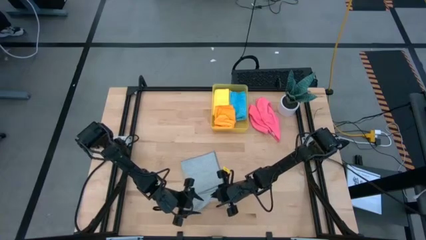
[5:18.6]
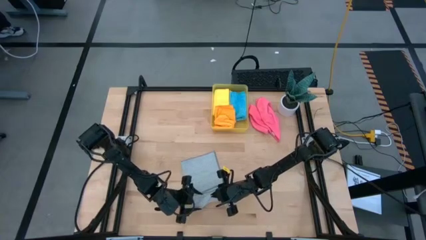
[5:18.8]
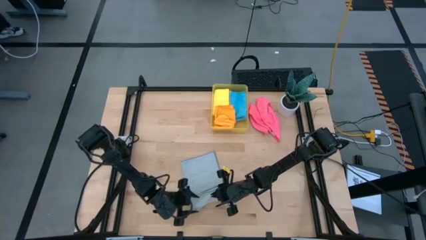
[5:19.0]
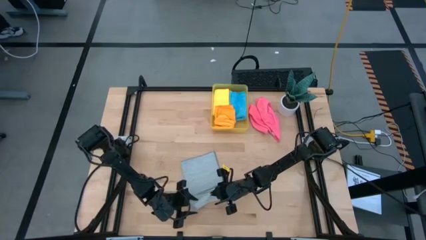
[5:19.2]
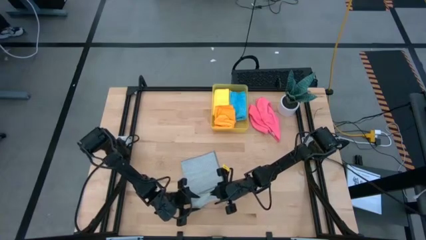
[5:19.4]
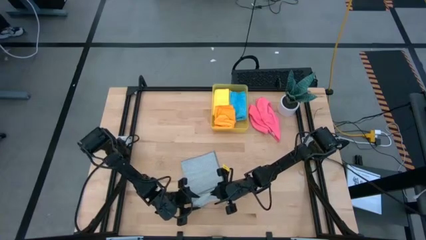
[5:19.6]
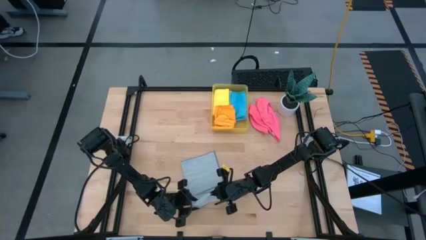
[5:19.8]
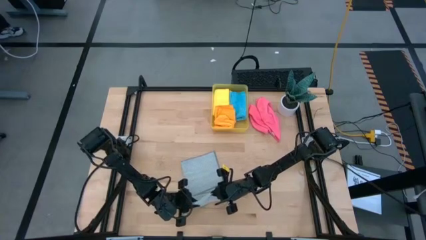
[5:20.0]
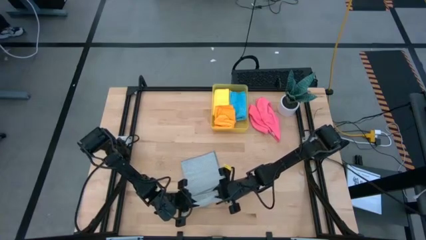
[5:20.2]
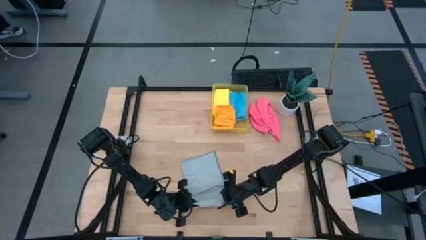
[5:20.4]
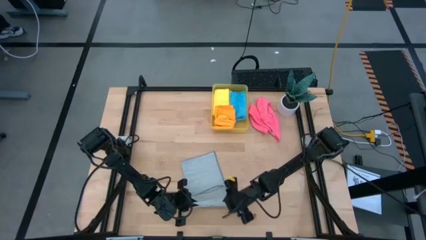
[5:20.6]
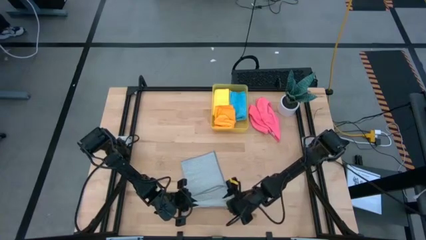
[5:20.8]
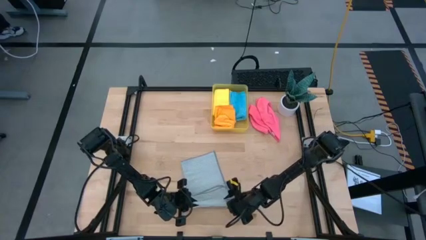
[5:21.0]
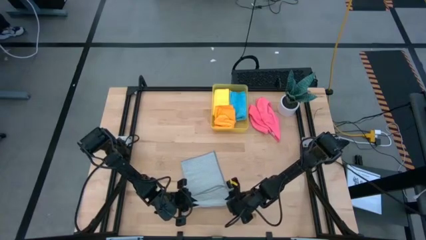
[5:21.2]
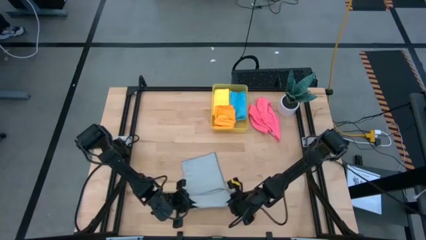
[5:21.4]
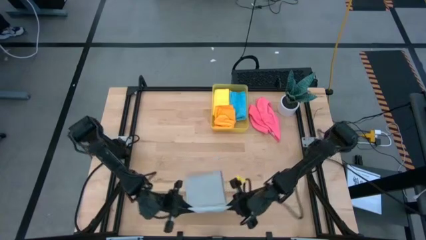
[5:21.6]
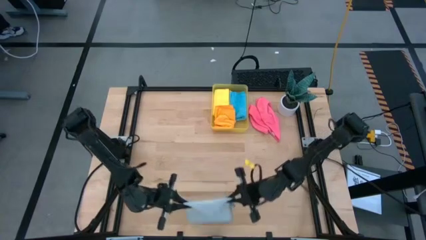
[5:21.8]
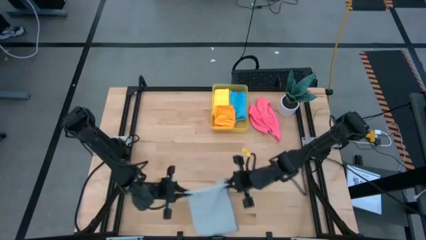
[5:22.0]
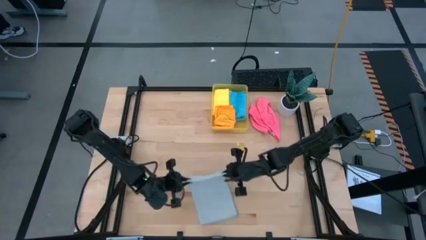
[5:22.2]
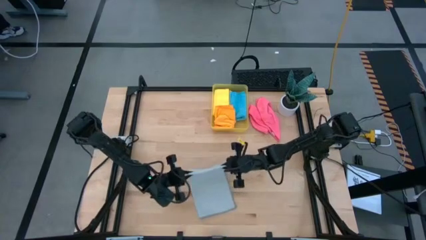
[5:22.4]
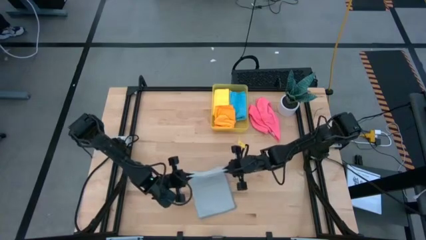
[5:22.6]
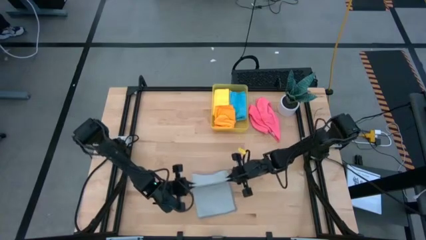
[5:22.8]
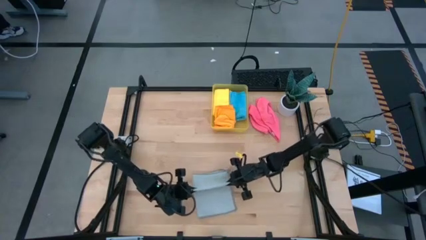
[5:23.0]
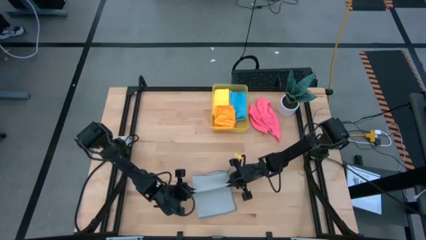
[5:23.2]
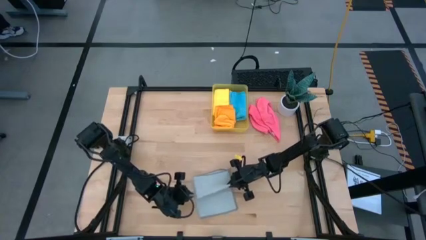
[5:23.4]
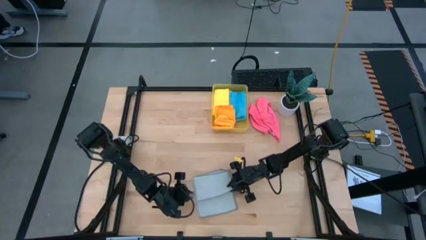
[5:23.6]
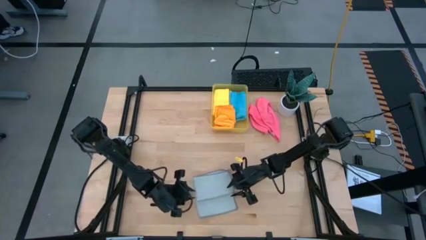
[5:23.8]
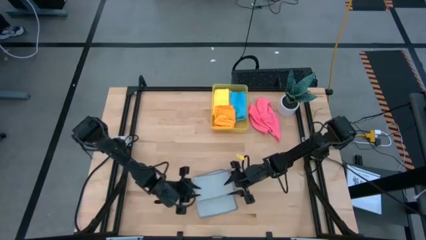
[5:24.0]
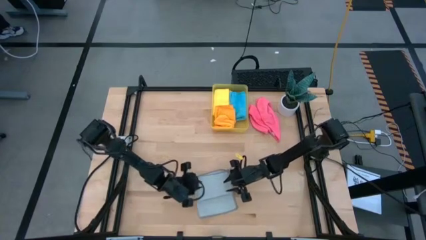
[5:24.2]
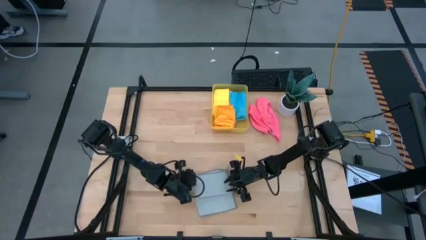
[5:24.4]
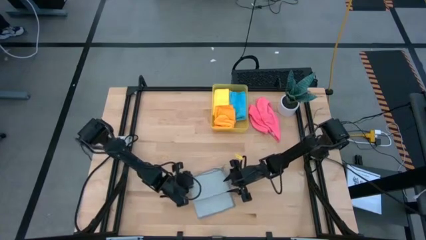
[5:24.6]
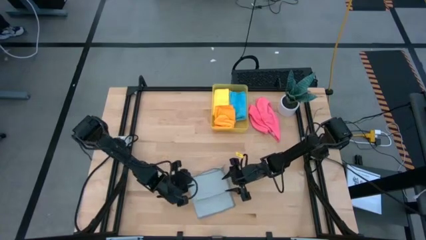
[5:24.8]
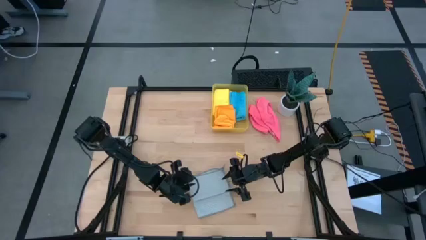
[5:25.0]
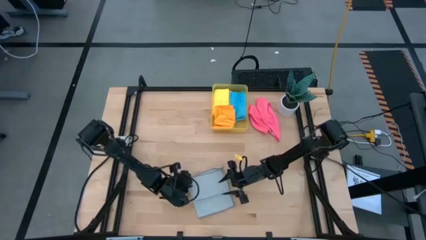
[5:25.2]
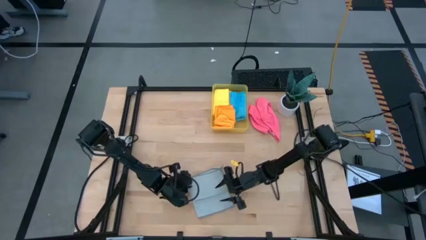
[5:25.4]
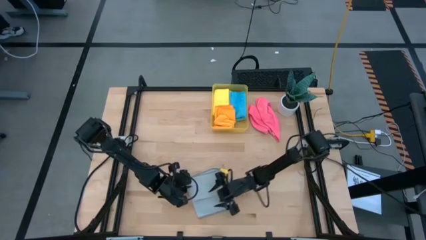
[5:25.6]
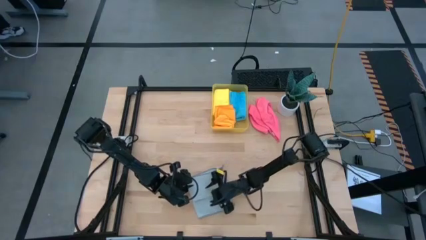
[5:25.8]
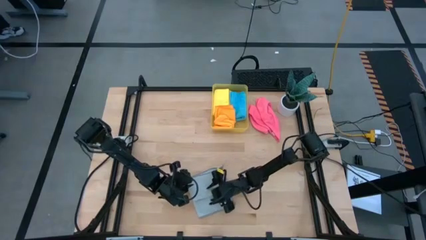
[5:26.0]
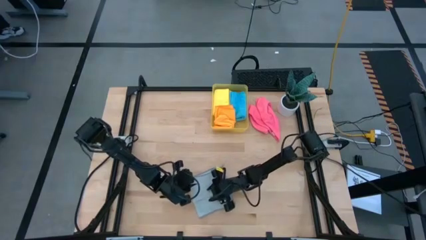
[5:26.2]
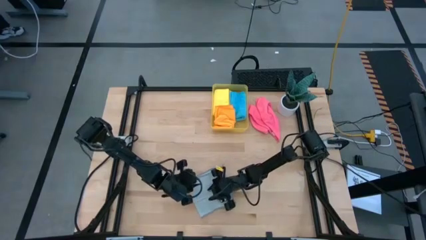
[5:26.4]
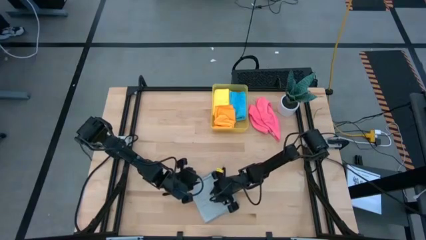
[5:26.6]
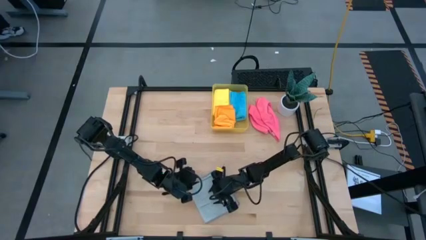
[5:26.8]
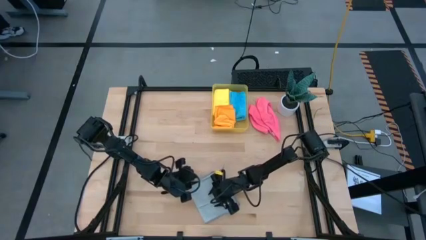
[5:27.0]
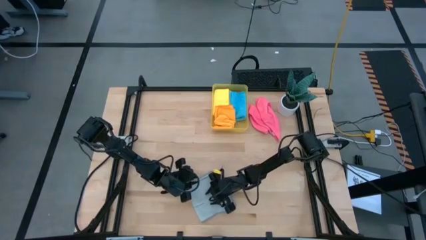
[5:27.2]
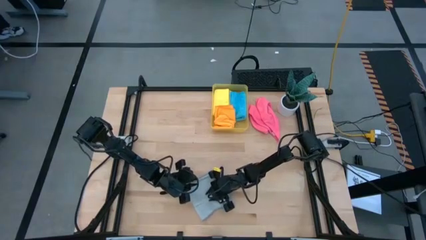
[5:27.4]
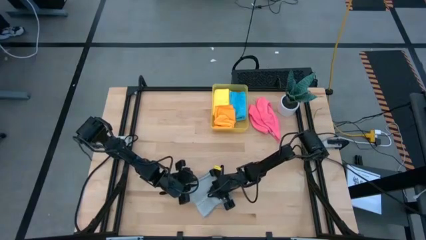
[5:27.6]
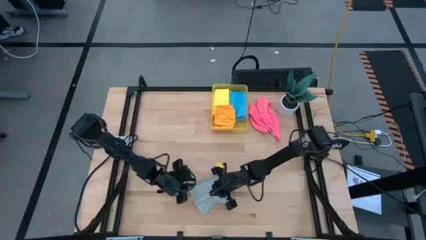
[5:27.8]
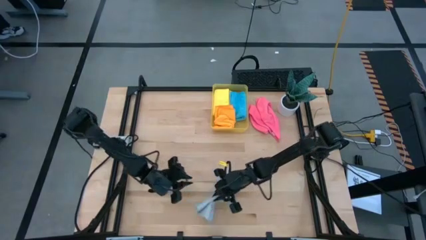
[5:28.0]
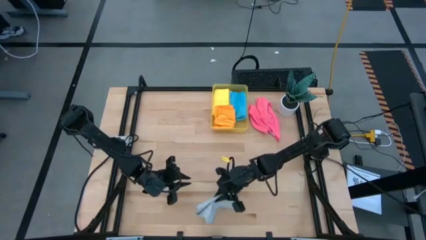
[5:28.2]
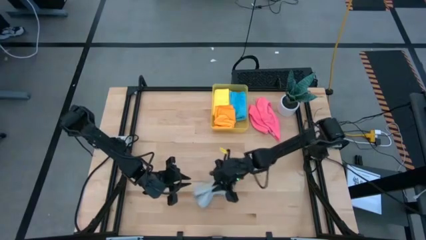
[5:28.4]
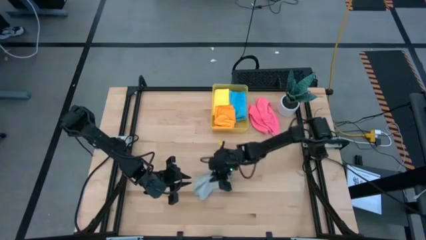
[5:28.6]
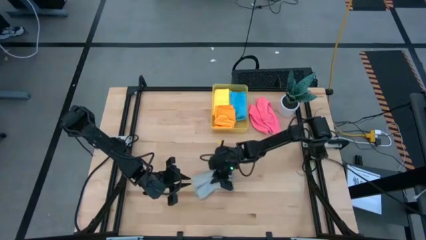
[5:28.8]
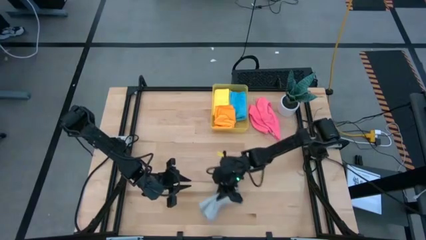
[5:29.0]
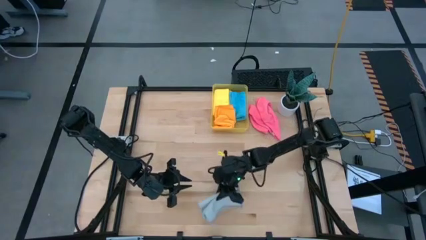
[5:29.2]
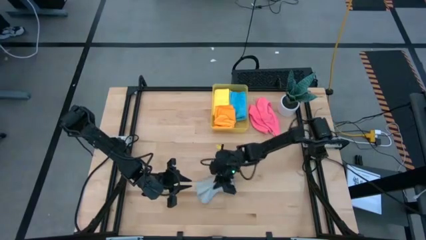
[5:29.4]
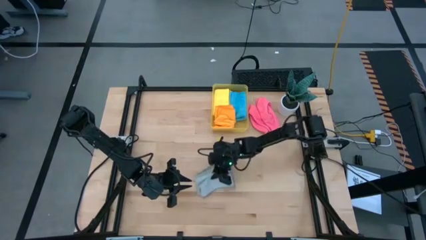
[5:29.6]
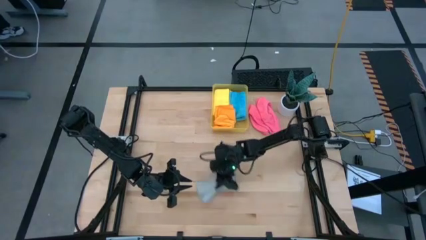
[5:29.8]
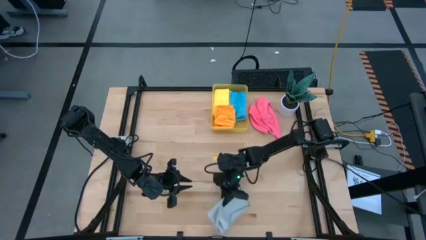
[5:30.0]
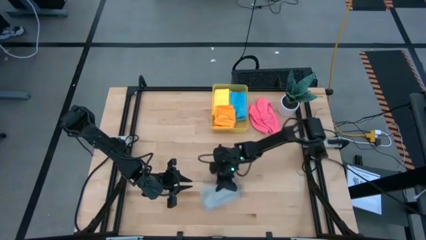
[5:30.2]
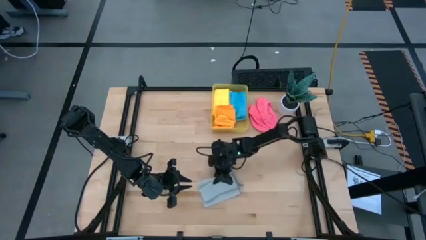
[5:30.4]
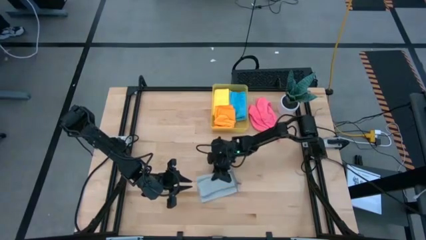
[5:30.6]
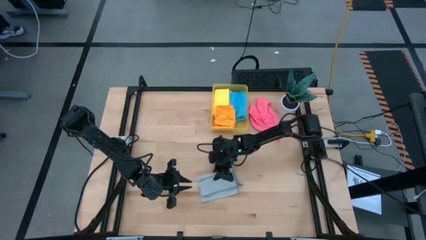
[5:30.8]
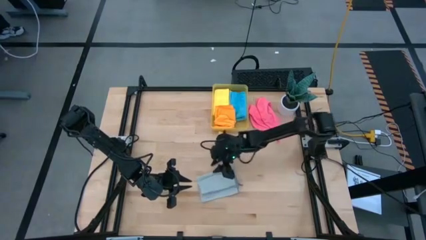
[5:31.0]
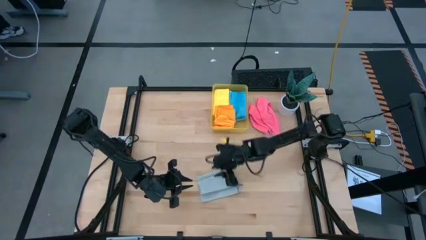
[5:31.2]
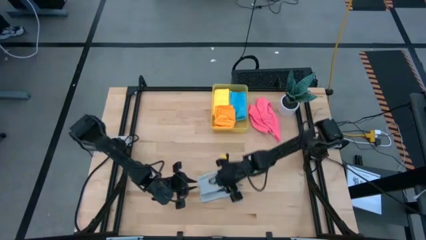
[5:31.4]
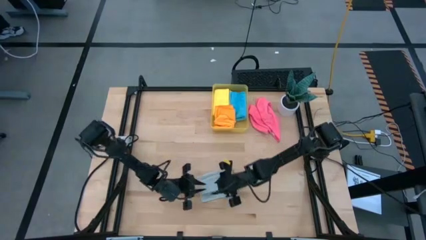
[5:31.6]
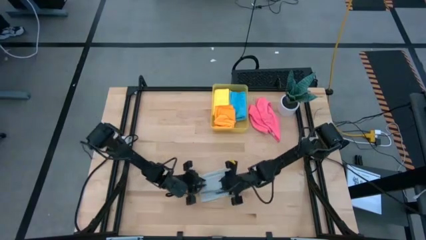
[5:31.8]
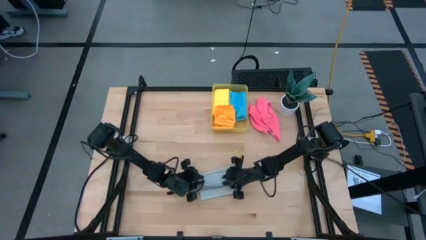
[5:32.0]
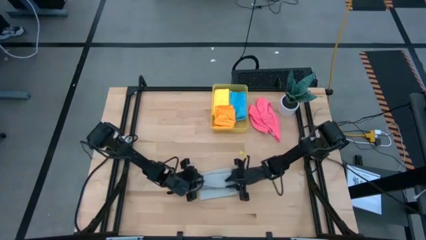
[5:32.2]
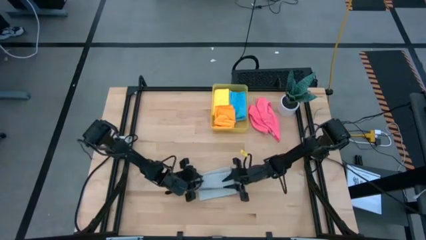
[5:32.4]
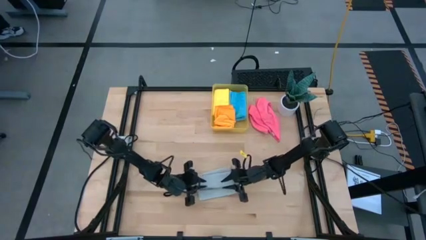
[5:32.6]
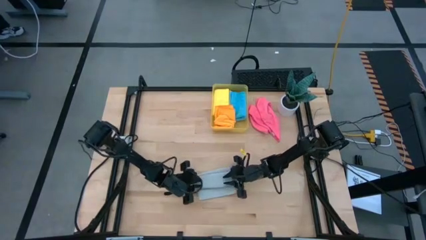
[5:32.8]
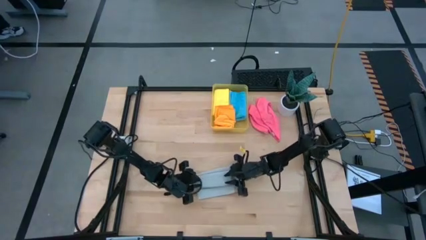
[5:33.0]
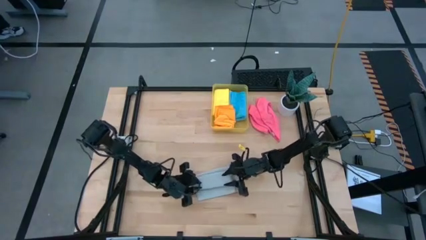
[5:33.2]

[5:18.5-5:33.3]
Task: Fold microfiber towels
Fold the gray microfiber towel

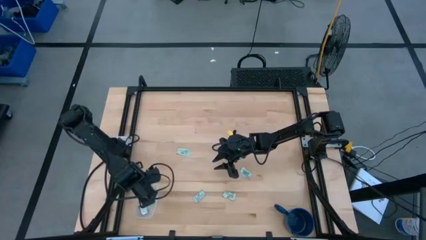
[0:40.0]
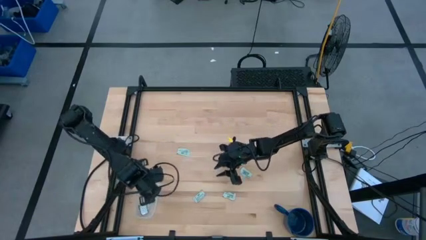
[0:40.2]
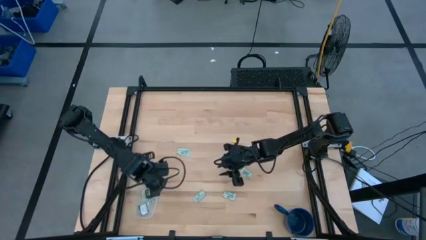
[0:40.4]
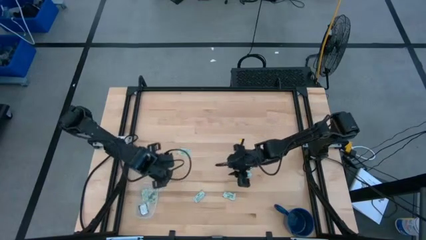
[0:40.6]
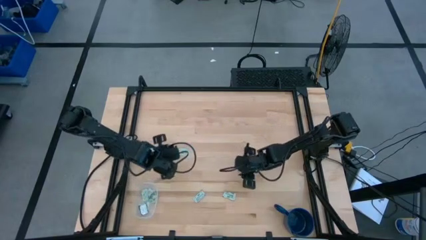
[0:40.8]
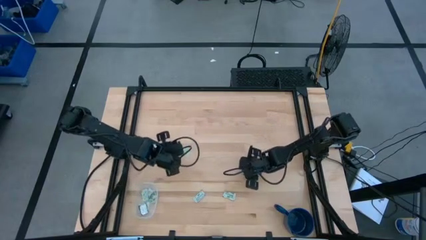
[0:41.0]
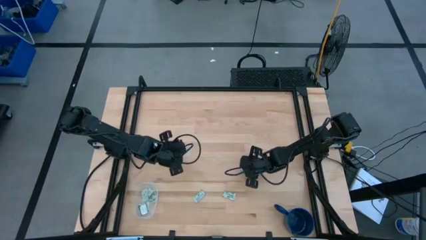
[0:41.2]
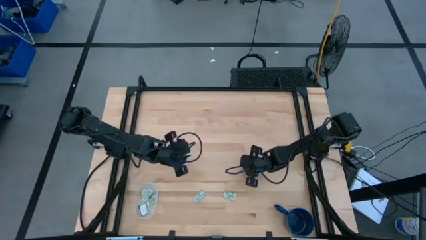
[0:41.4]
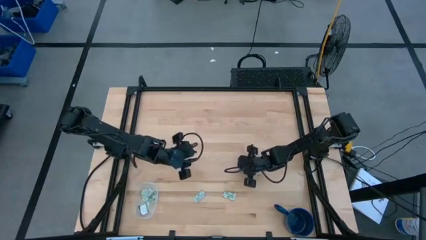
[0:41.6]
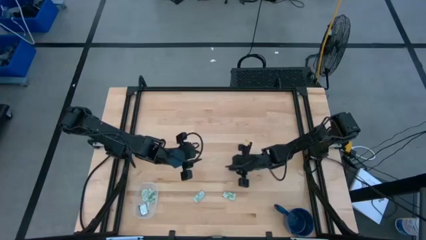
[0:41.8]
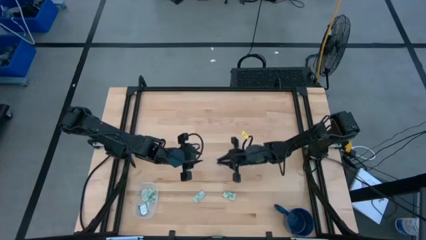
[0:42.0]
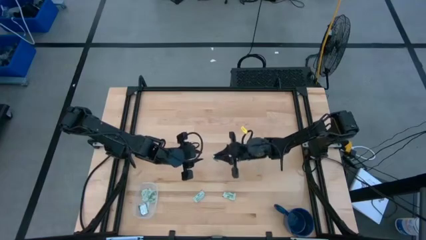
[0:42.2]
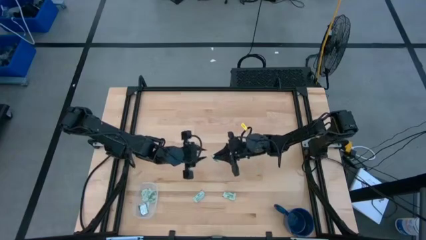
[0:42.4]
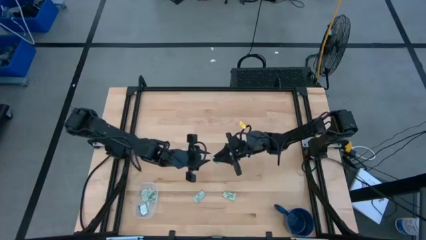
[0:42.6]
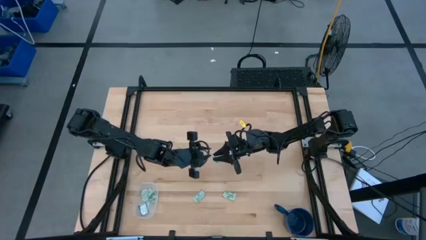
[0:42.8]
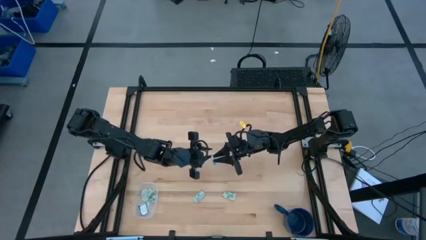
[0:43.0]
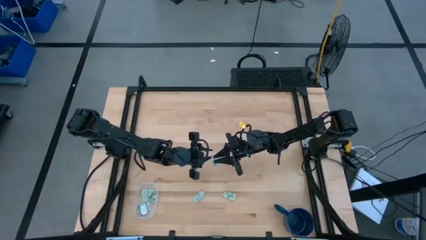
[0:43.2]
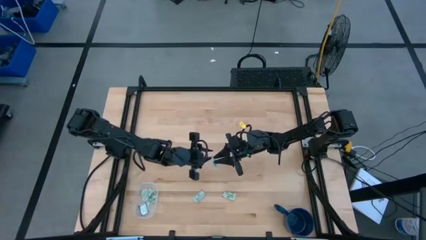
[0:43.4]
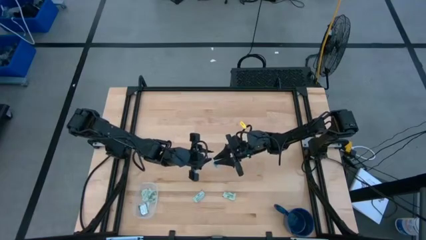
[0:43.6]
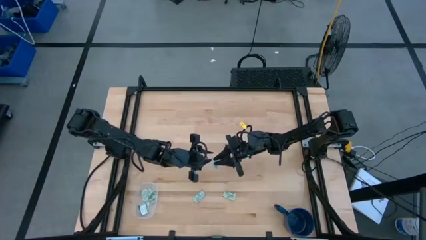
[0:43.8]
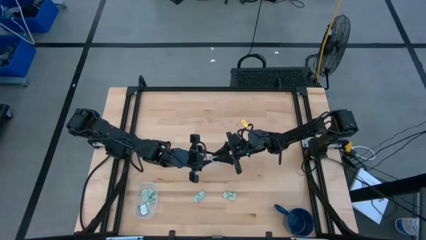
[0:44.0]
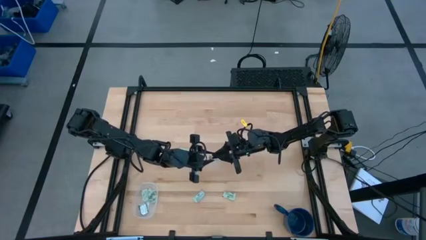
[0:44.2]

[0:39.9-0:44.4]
Task: Pick and place Stevia / Truvia into bins
Put the stevia packet into the transparent bin
